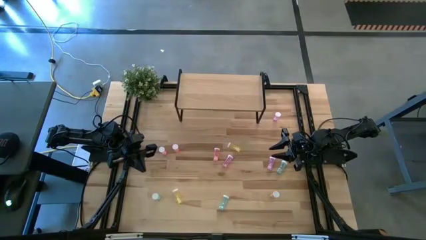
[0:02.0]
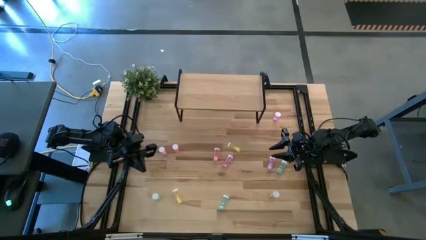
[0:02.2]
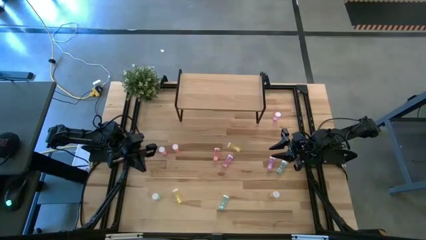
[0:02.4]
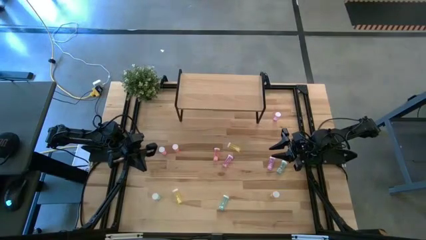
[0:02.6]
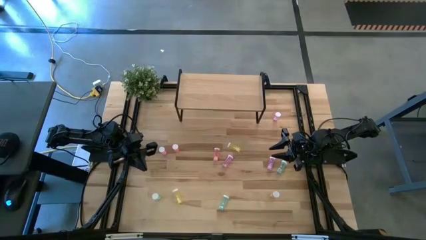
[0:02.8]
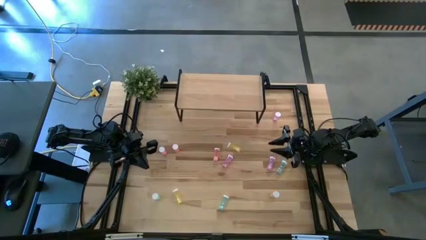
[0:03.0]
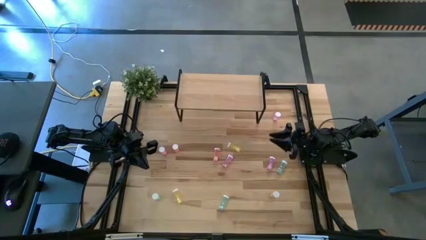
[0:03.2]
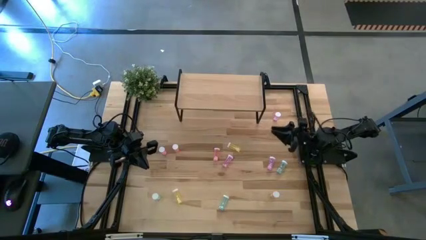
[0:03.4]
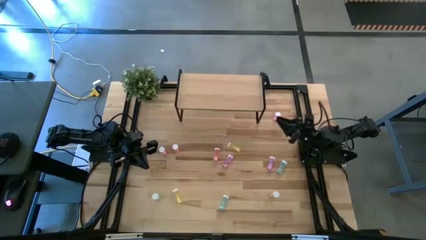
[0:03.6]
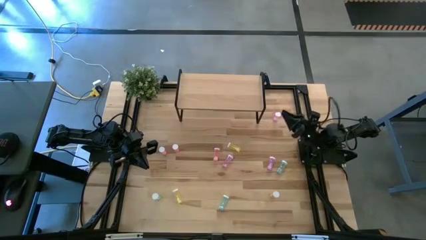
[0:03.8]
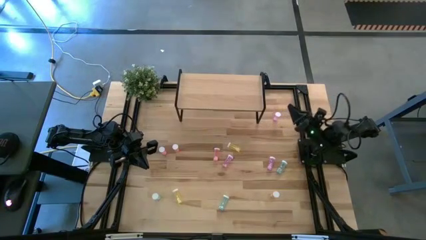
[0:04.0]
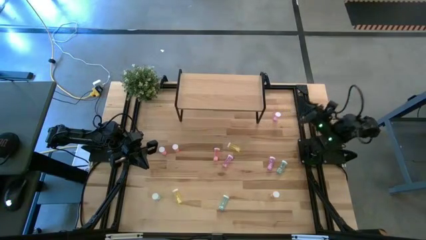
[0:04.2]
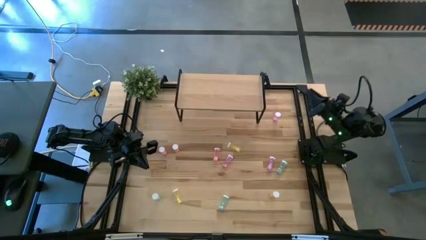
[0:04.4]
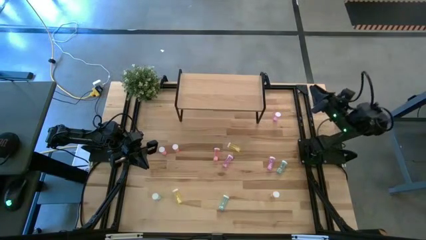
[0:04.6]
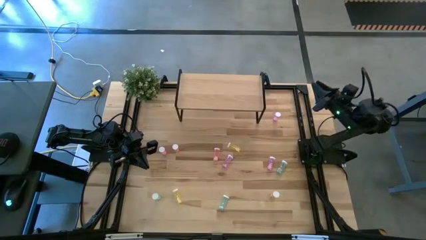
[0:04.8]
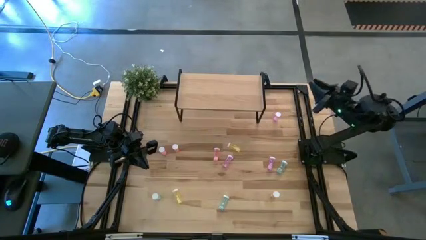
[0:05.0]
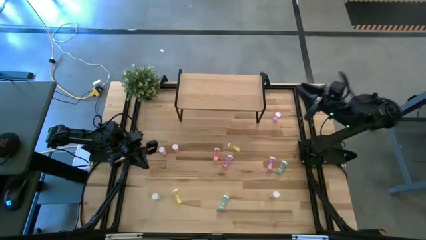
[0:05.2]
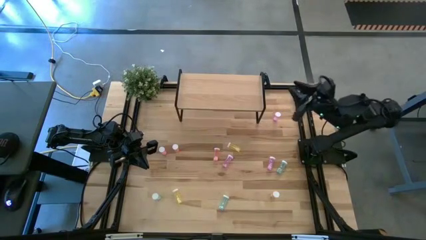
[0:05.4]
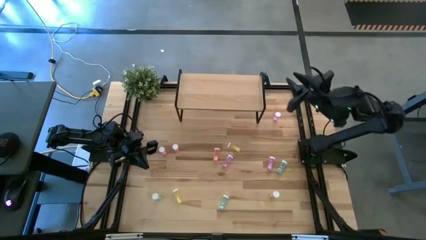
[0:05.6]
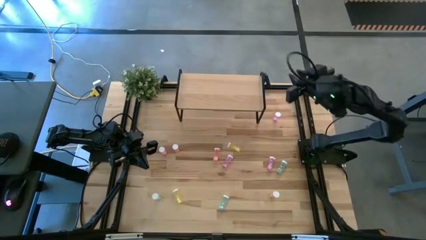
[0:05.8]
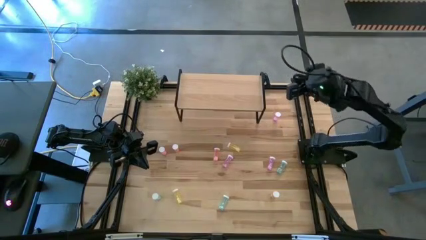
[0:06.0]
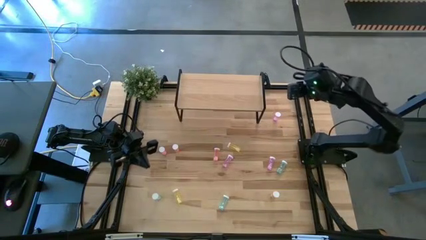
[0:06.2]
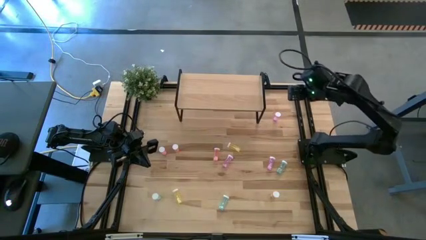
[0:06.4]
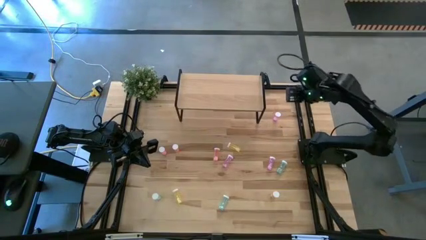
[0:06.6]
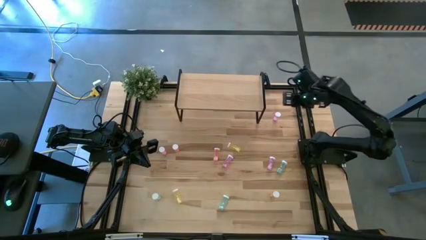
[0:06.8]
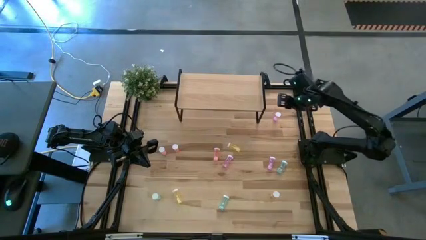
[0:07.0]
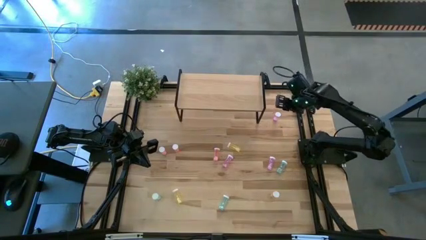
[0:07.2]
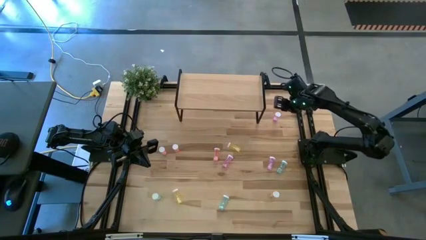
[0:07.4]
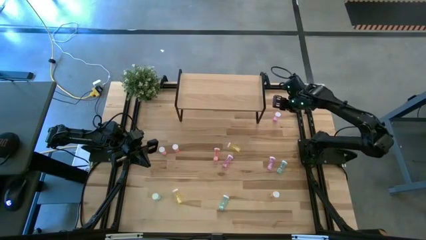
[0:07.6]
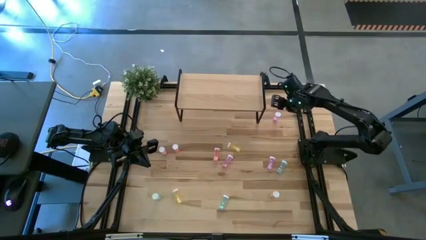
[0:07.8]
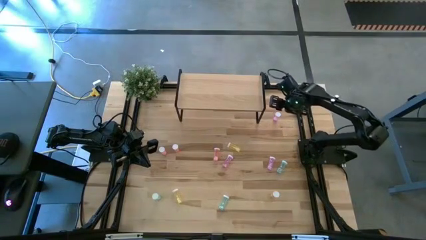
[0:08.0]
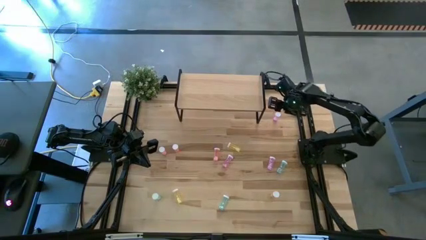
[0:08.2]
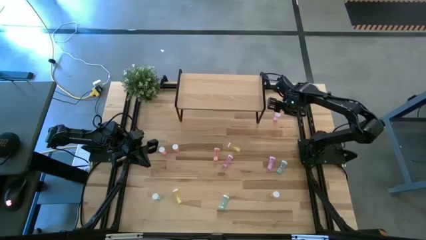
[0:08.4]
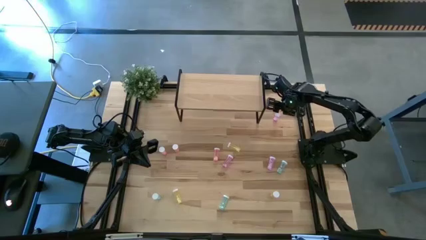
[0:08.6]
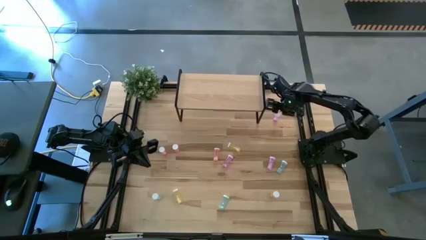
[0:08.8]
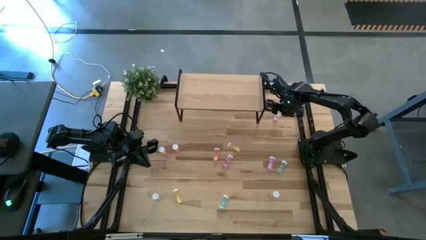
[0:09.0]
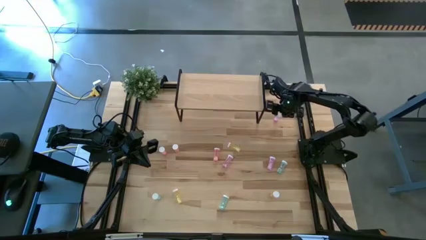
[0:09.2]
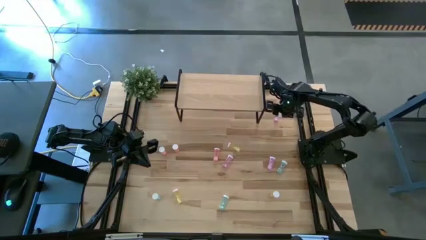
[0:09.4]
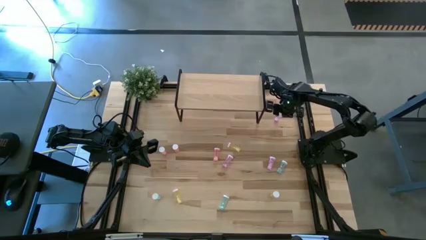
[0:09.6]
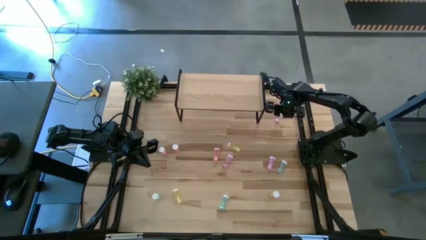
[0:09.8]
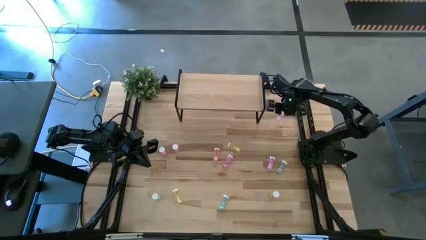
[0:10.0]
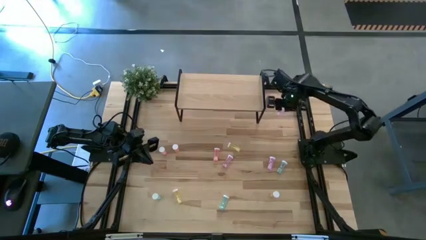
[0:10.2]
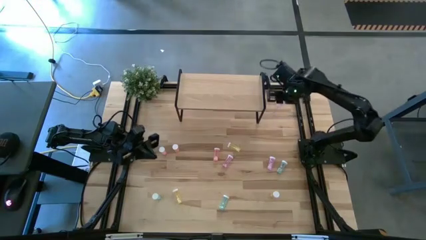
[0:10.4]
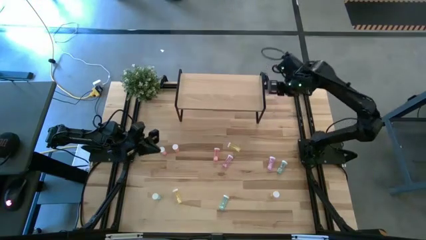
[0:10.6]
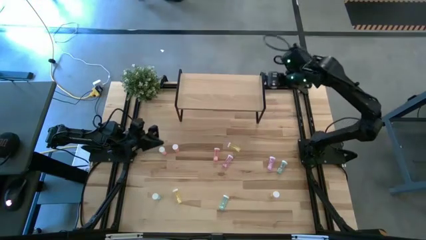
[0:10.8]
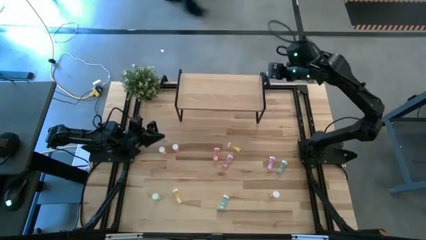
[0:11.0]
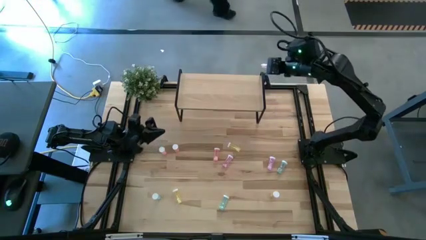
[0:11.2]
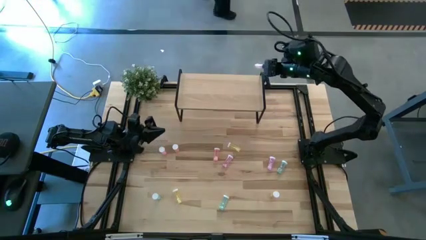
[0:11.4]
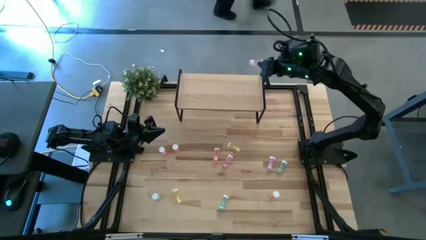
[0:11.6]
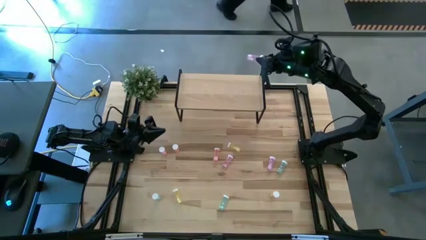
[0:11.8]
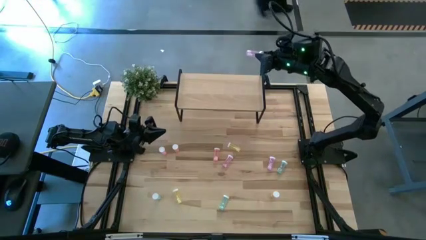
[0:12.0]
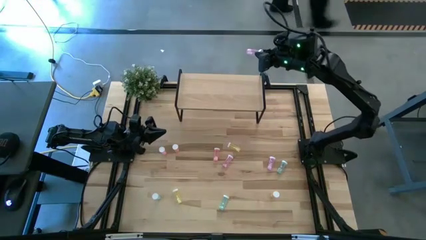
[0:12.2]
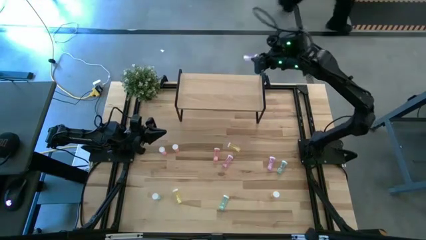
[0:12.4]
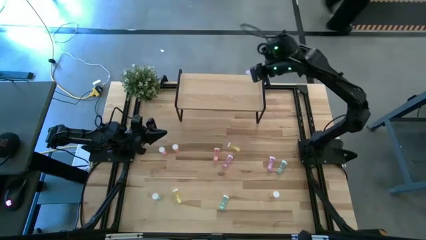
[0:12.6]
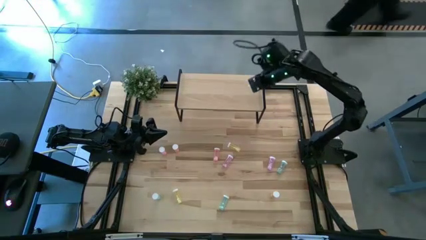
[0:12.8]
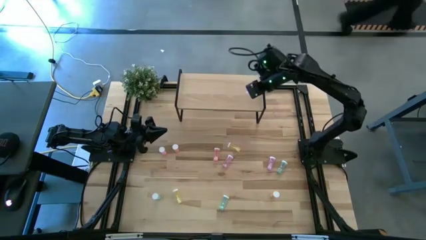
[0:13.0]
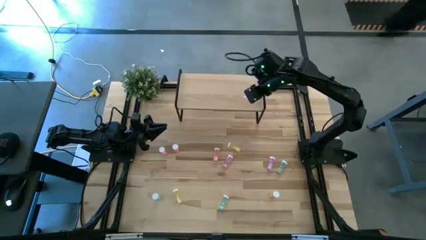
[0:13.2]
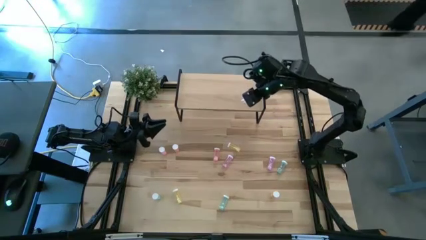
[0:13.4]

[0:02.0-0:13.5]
Task: Pick and place medicine bottles onto shelf by color
Put the top right purple pill bottle on the shelf

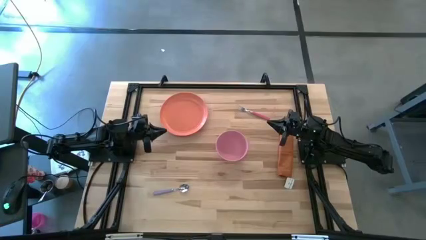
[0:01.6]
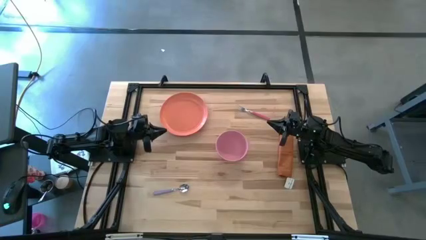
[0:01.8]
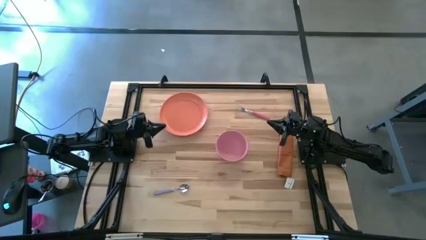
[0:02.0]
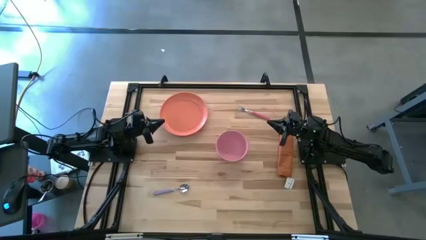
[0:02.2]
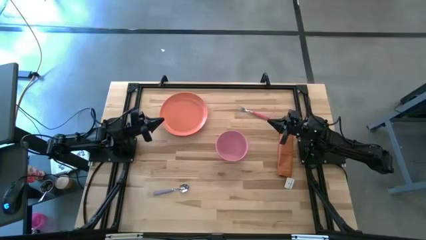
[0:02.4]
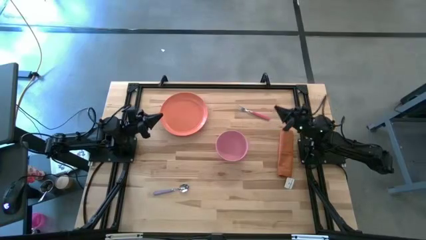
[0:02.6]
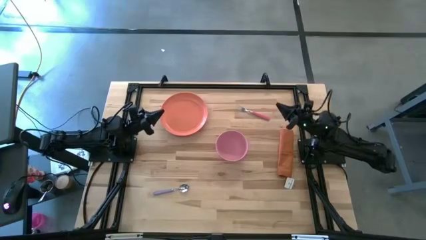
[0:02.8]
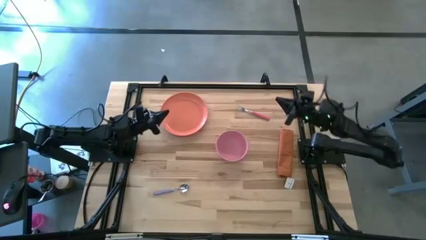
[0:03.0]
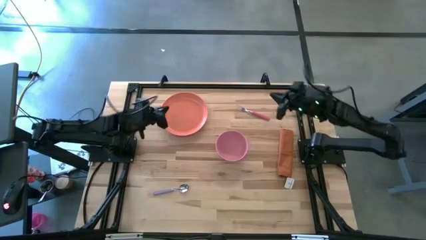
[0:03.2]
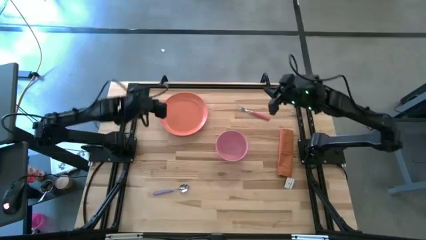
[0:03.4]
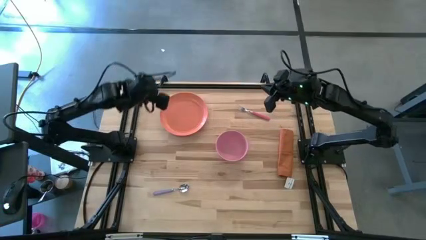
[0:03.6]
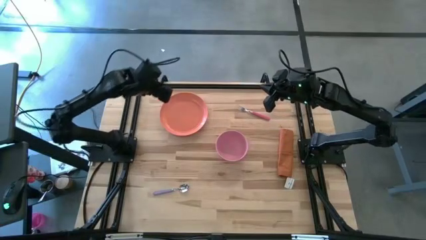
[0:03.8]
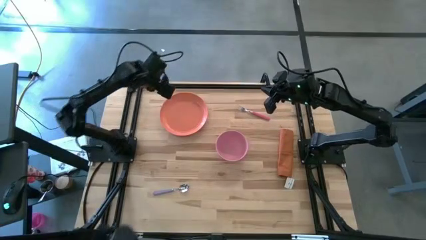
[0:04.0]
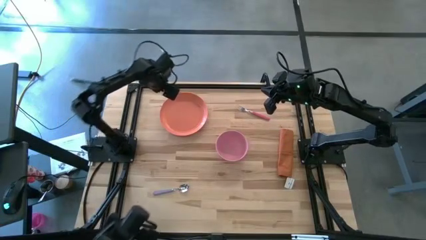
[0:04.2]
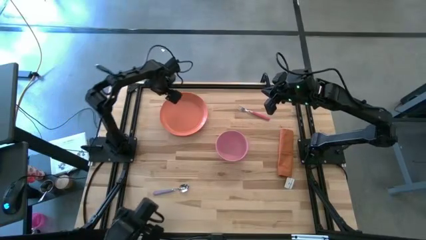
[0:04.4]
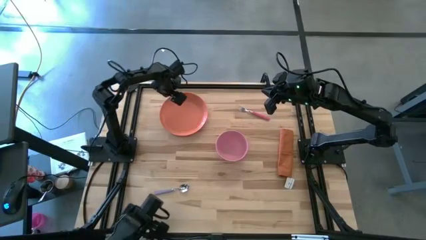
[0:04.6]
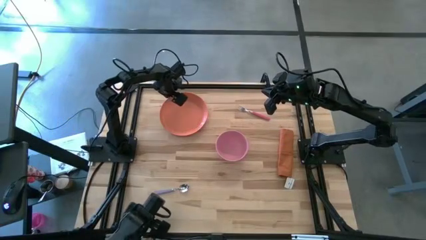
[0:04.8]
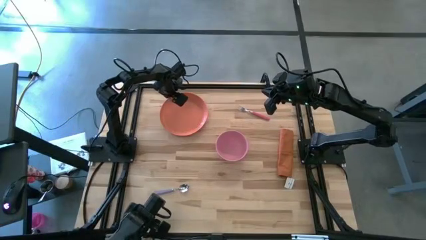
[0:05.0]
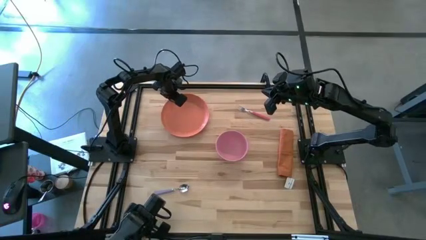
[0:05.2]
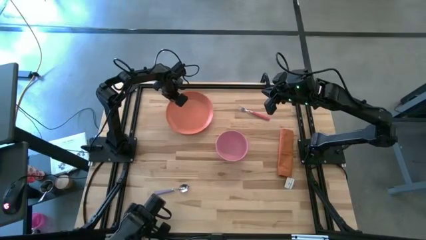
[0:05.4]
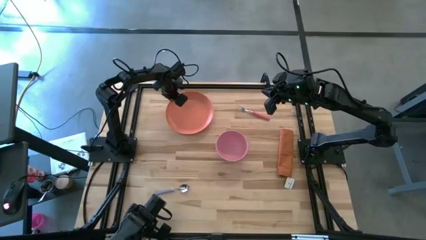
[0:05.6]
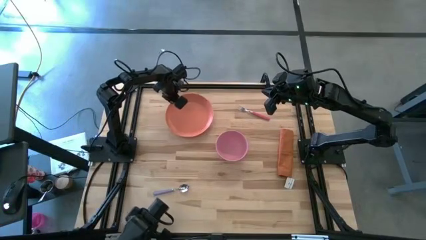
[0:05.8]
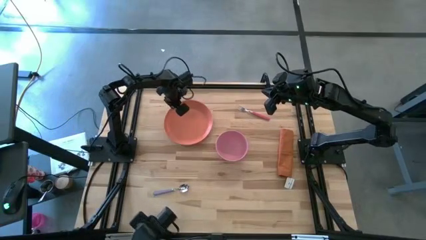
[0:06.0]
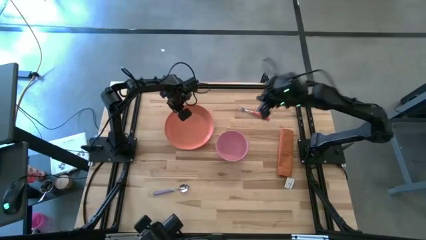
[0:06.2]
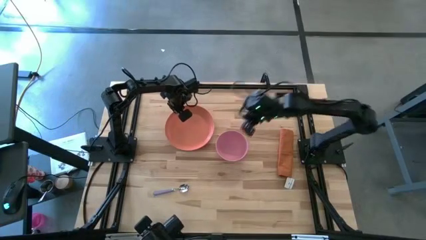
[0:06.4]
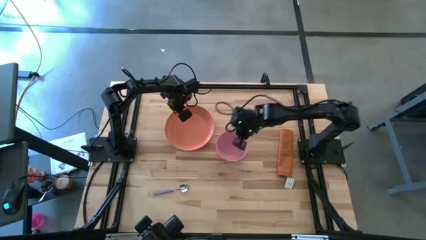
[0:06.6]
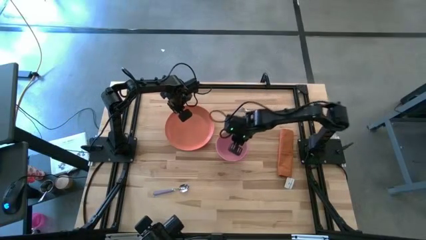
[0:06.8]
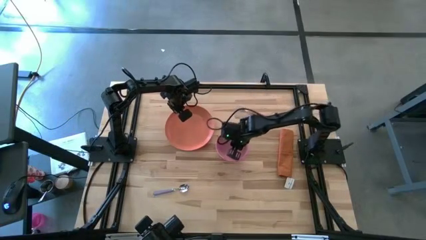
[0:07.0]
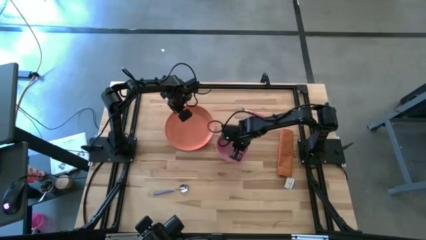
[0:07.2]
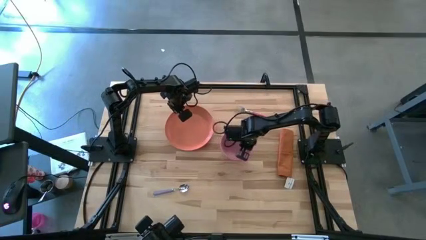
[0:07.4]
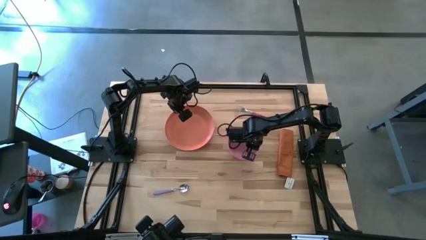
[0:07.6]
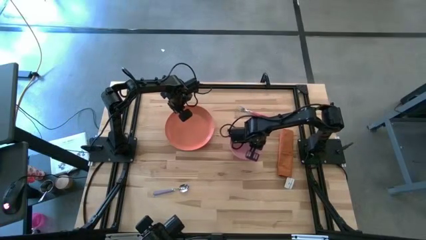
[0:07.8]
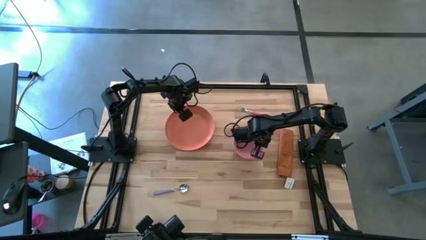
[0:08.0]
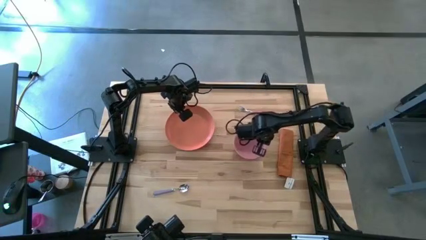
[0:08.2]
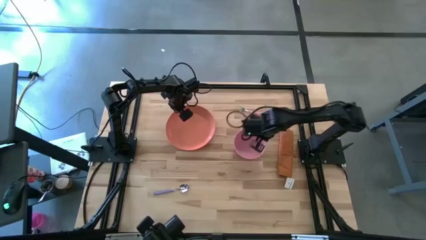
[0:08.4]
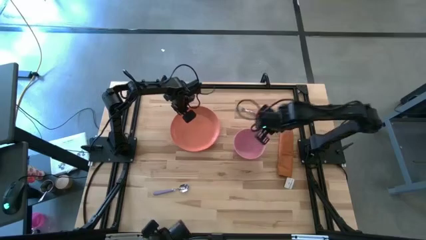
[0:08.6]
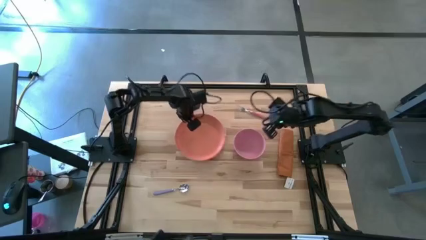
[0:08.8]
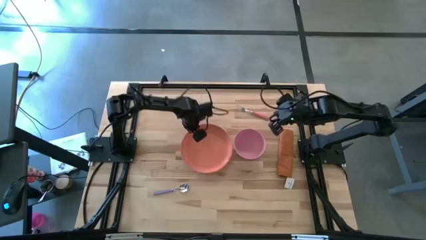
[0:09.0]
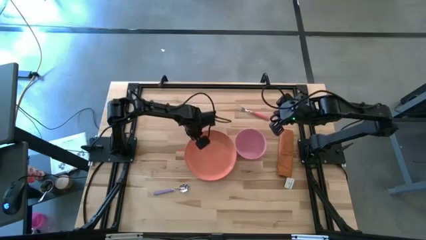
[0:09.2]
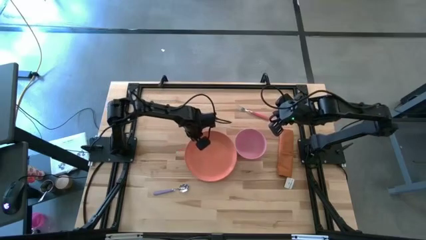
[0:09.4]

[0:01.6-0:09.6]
Task: Set table place
Move the plate to the center
